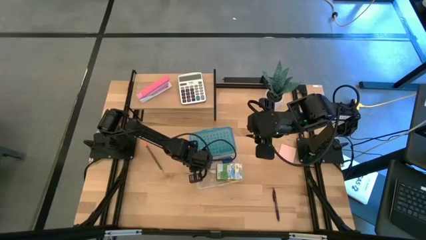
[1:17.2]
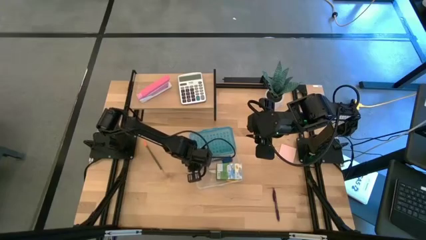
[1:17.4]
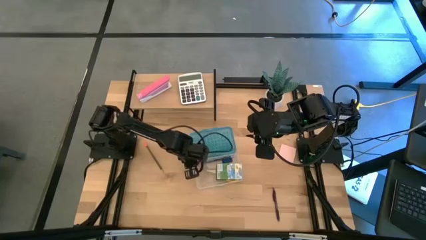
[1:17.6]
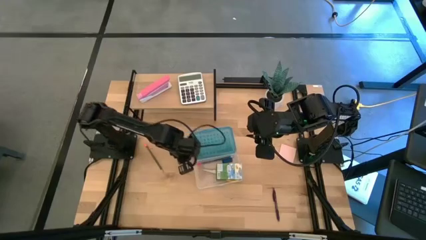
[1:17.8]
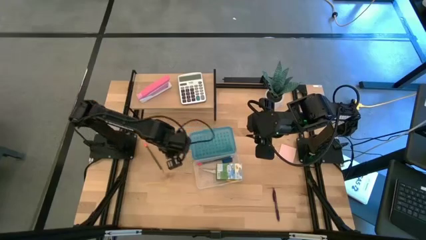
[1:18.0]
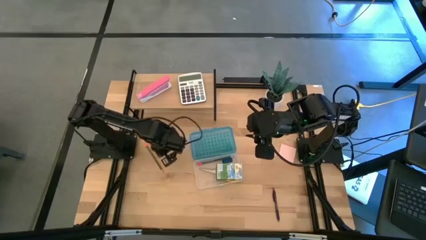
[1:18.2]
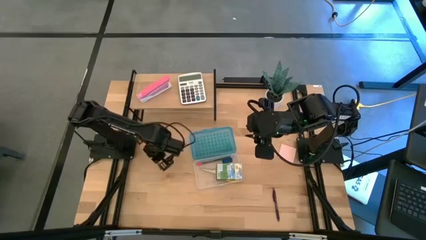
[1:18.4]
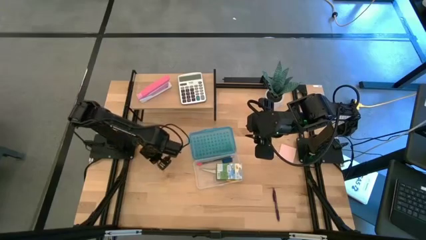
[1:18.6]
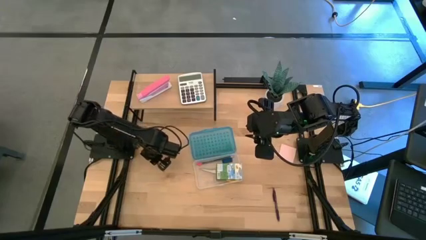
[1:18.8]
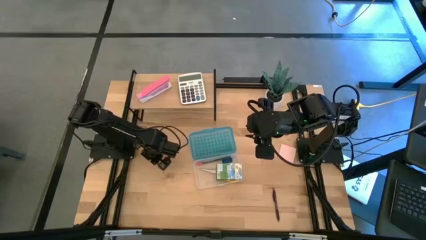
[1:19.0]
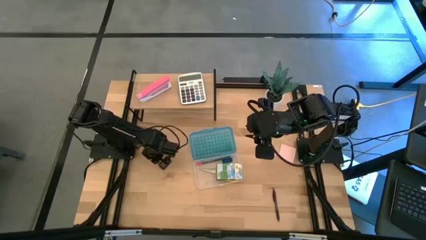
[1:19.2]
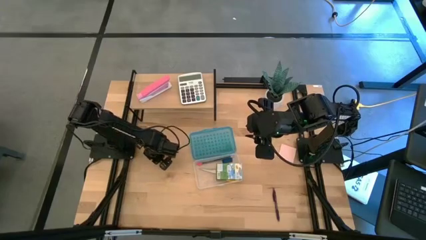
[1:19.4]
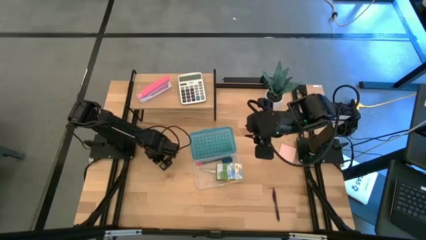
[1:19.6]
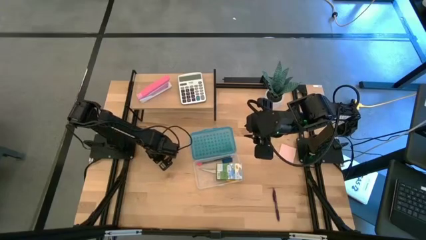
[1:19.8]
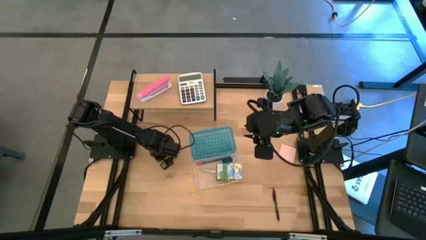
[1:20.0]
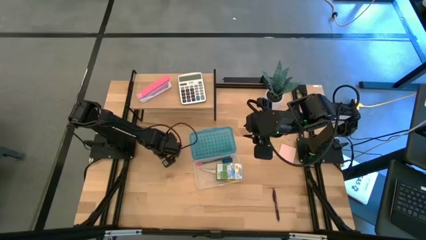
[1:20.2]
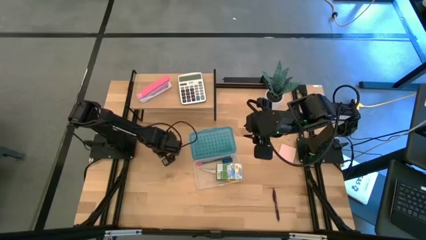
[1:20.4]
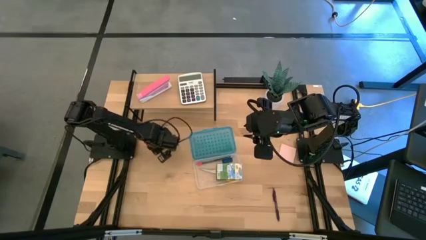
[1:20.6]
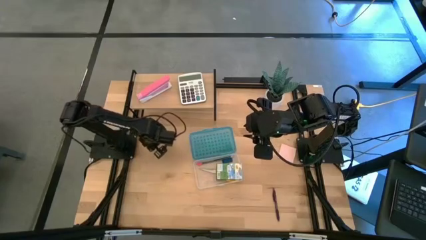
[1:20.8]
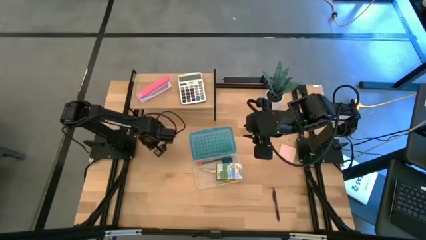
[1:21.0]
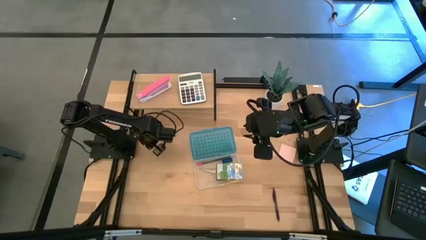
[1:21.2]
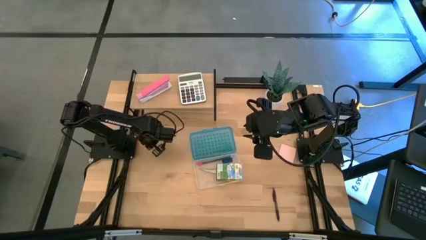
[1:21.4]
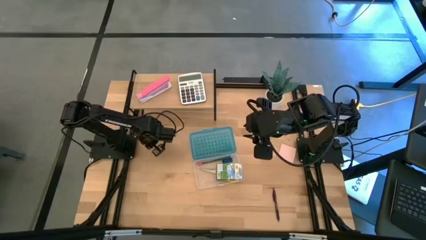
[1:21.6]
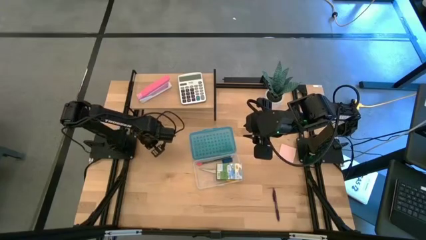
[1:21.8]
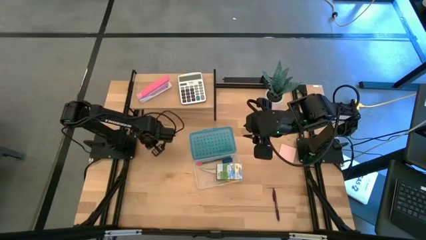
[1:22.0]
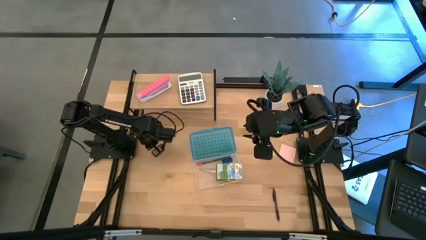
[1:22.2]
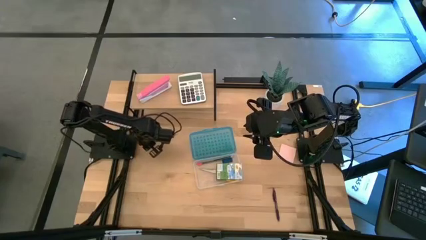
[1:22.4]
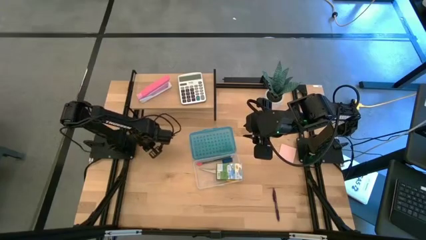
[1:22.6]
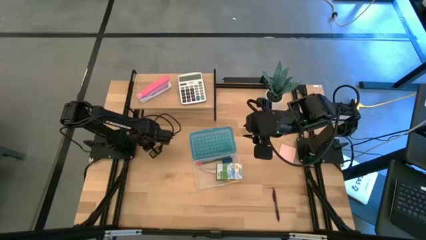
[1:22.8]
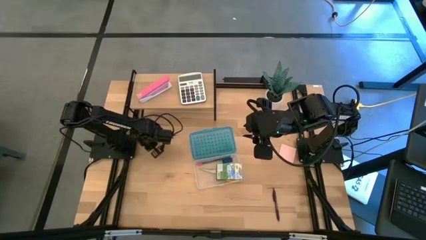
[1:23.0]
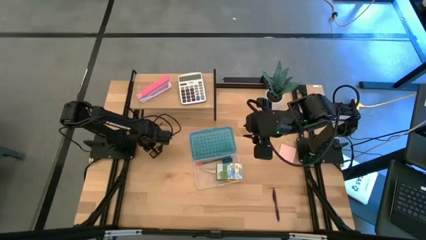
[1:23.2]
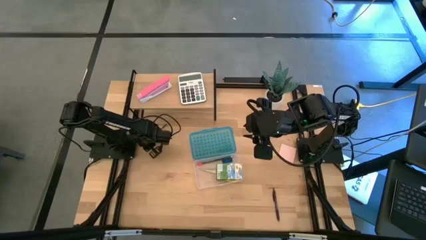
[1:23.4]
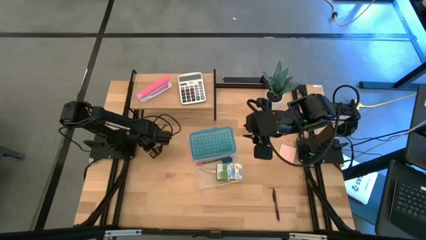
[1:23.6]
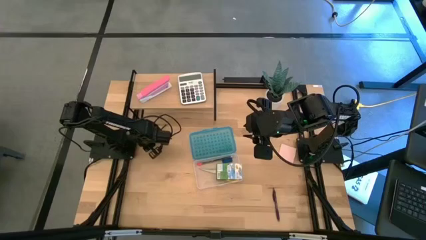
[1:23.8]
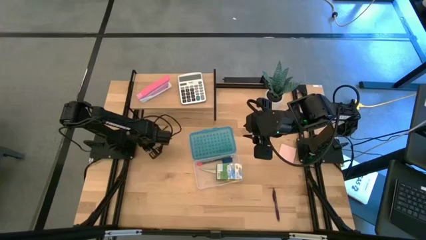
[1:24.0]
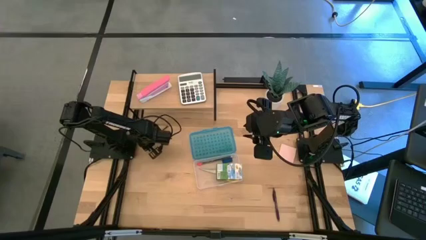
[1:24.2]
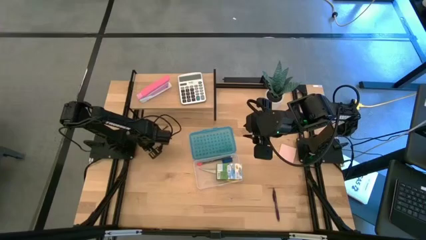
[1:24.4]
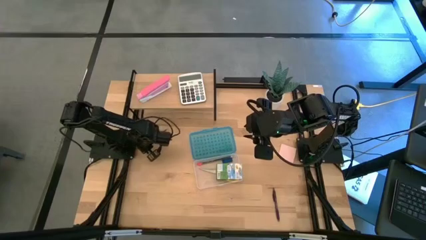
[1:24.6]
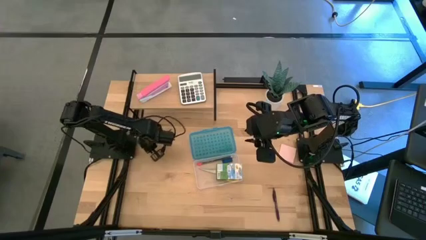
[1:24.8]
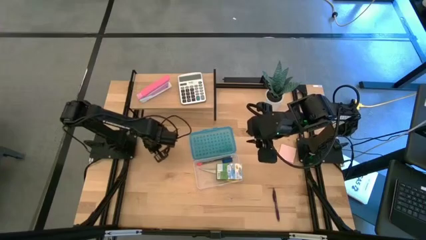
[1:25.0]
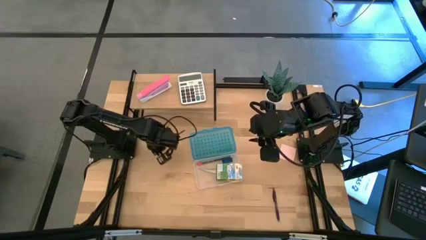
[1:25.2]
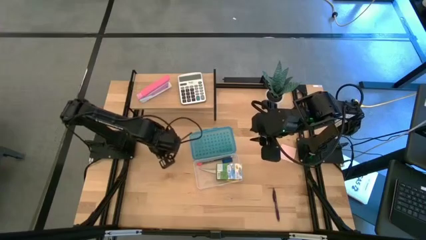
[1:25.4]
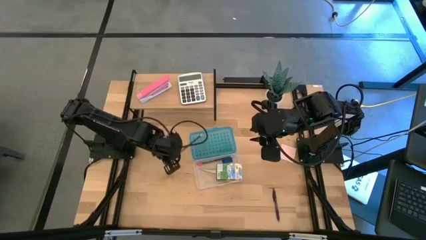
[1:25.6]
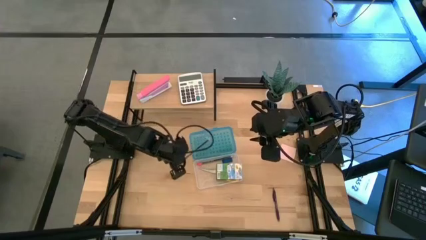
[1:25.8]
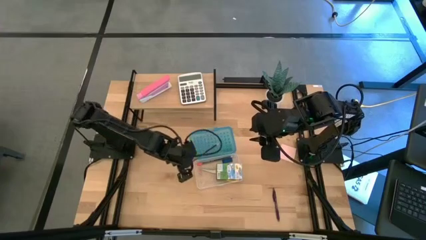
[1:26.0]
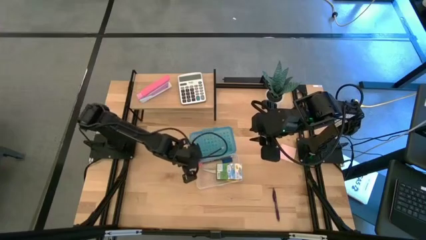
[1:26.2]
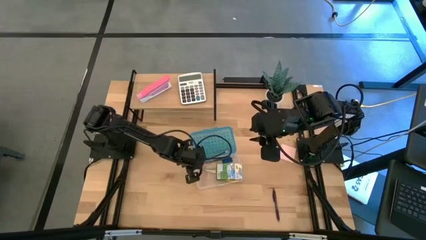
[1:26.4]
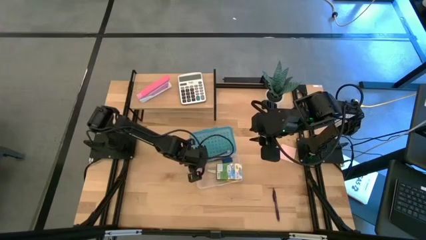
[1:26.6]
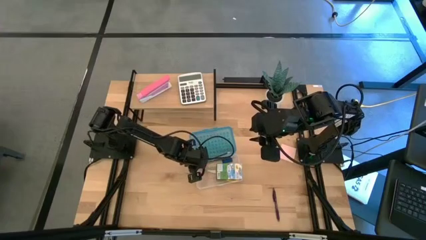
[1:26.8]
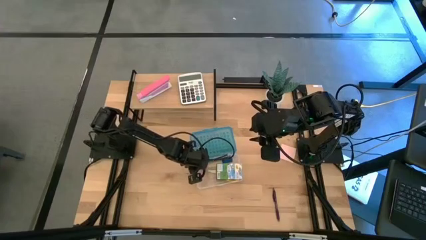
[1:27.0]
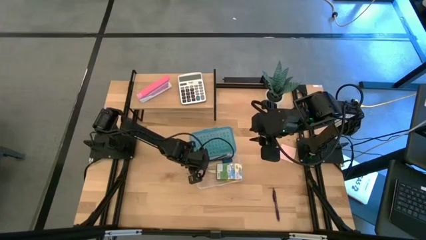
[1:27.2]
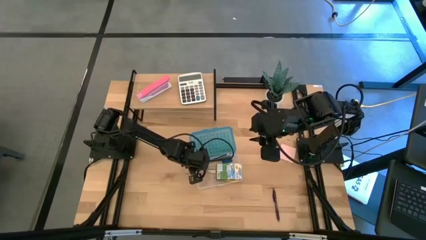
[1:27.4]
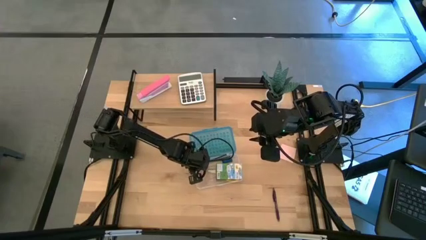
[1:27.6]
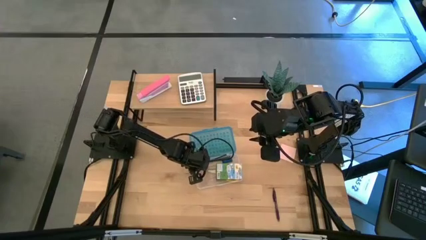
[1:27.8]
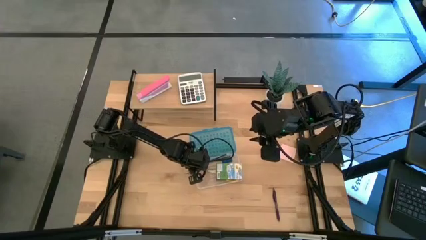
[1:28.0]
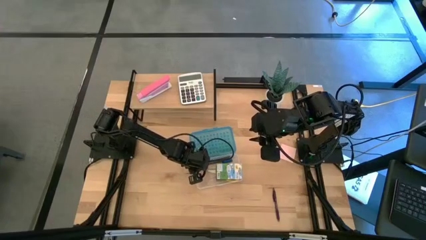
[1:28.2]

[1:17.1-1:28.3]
Task: Pack school essentials
Put the orange pencil into the blue supply box

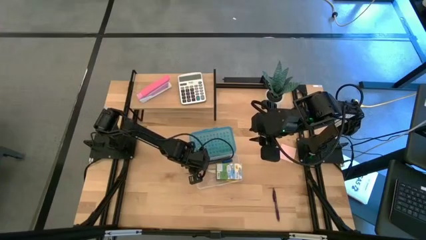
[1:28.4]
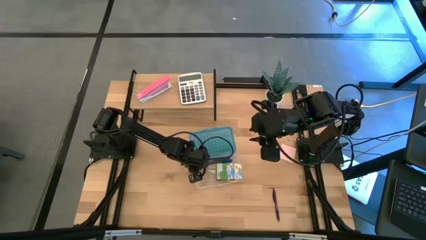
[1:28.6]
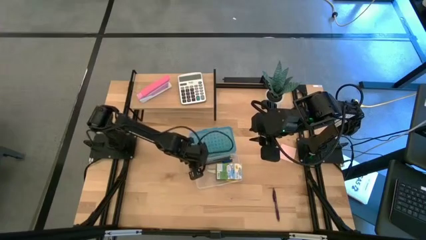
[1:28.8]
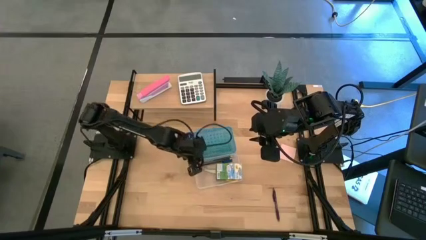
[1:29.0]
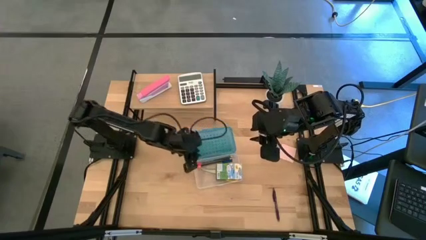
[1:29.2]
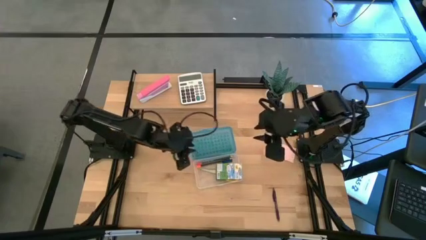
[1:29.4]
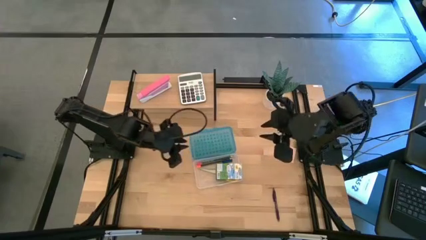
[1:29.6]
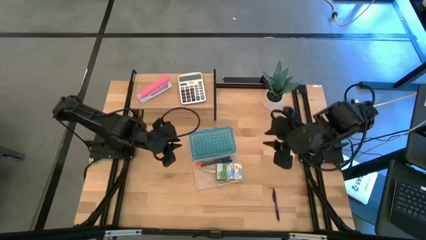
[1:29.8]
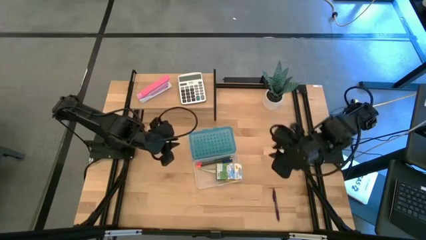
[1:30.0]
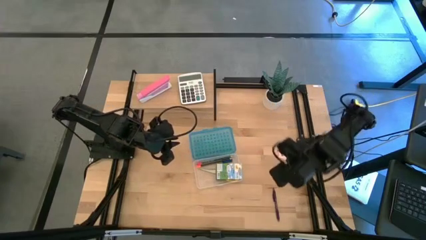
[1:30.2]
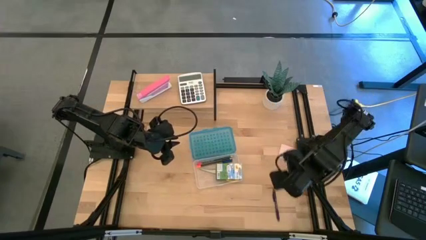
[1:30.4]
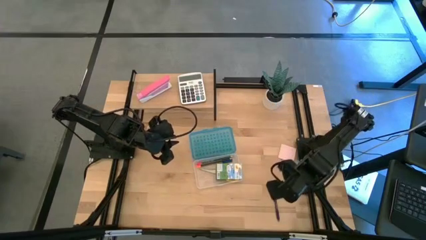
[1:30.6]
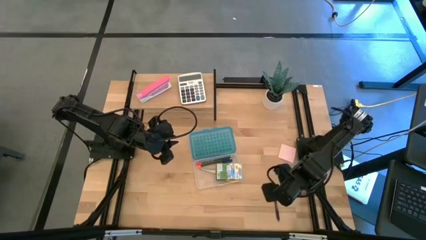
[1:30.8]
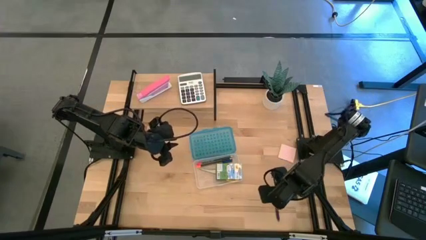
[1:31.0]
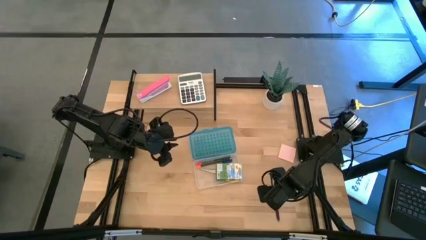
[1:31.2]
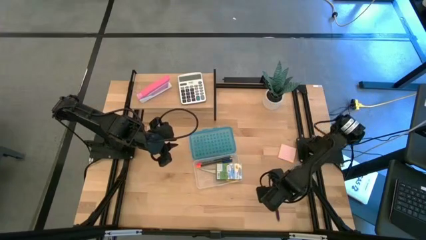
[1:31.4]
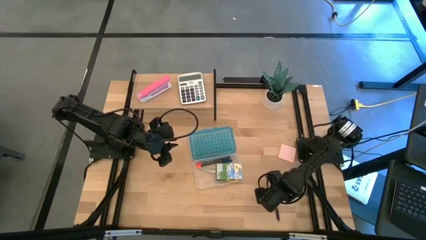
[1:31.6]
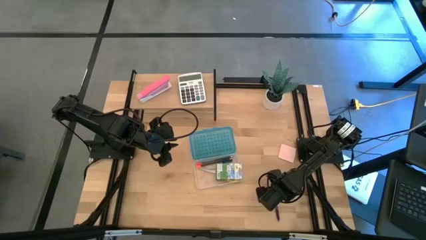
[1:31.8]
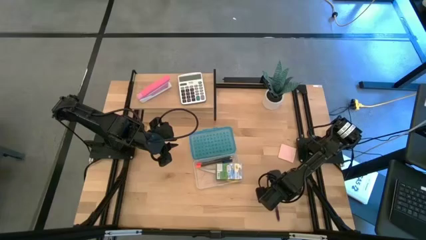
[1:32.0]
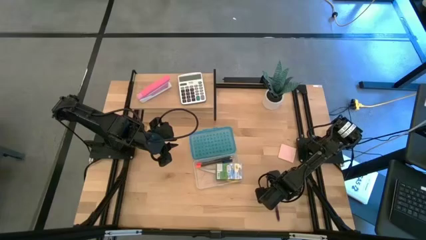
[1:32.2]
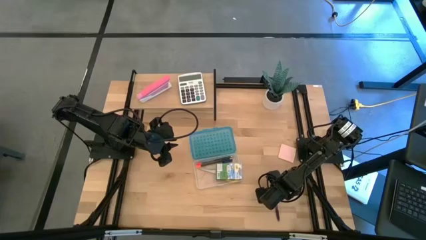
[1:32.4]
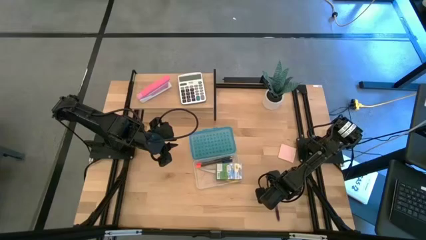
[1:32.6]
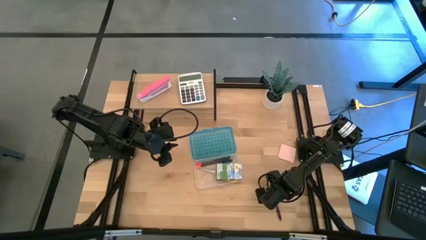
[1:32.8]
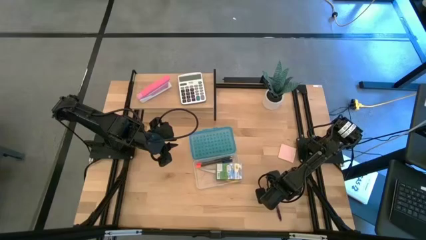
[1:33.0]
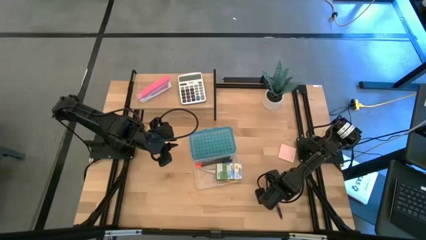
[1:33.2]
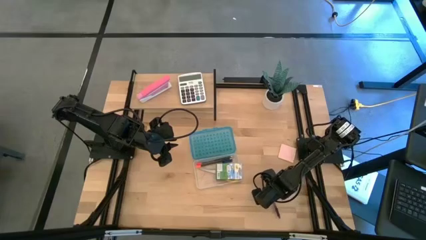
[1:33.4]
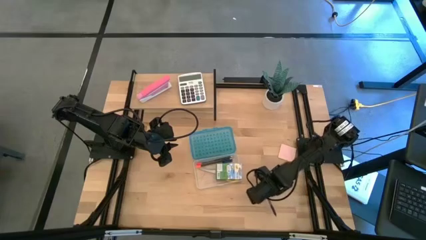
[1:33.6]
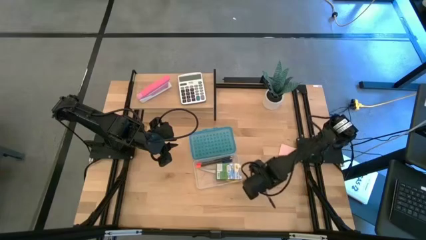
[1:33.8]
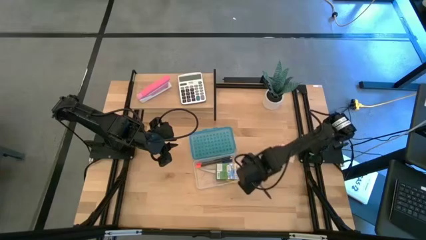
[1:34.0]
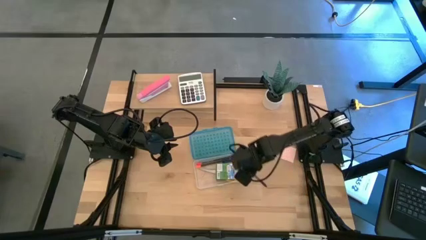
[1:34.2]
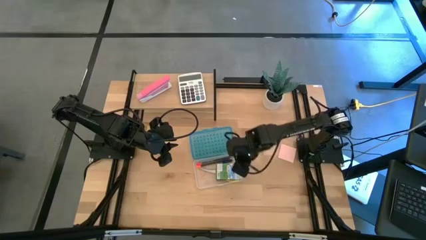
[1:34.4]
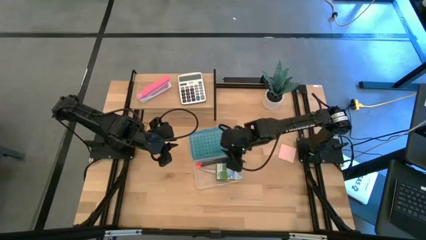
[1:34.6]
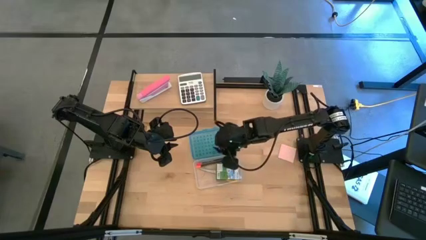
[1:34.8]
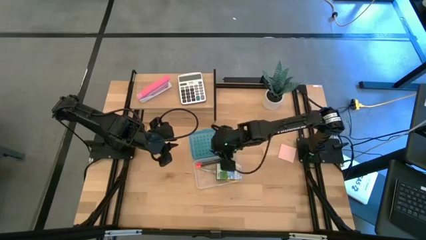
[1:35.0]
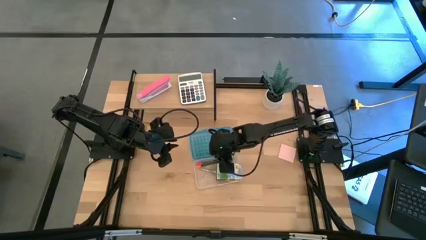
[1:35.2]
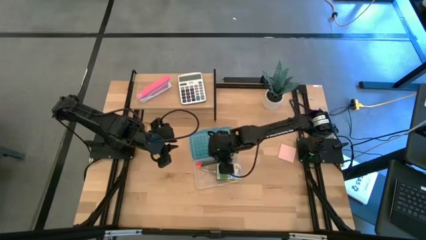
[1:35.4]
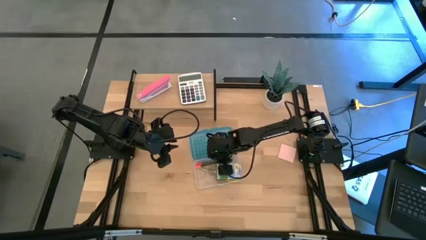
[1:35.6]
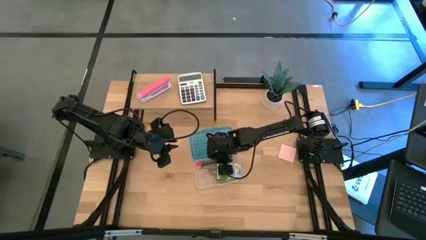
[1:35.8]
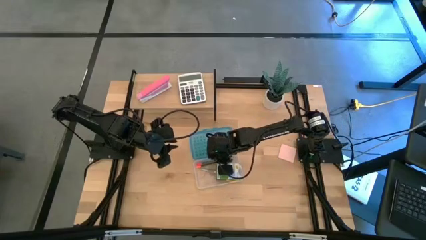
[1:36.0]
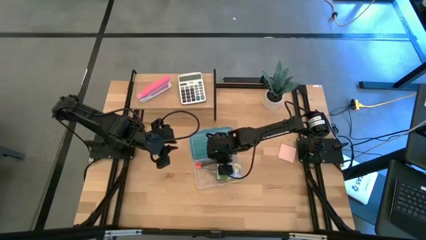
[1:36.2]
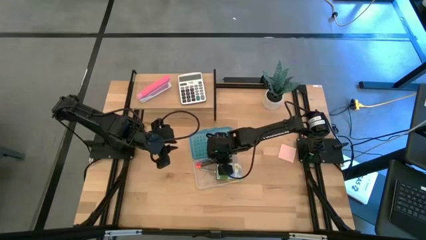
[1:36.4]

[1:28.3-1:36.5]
Put the purple pen into the blue supply box
